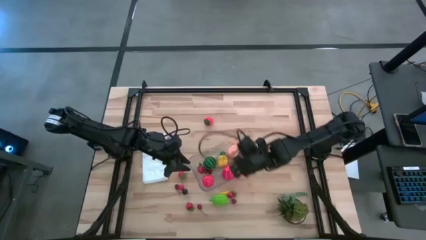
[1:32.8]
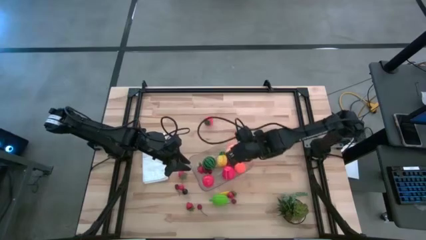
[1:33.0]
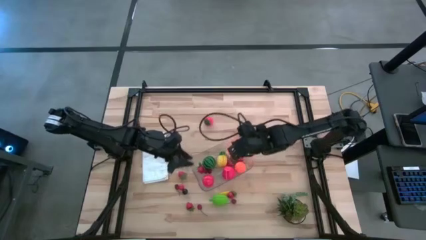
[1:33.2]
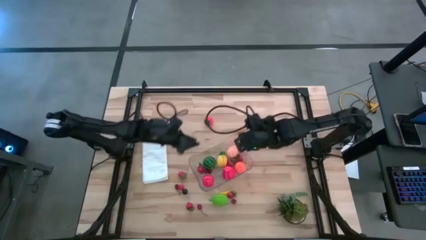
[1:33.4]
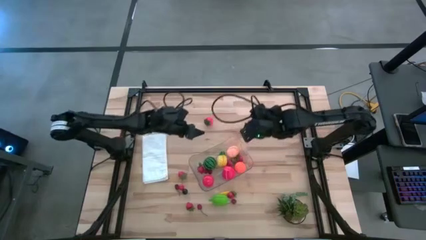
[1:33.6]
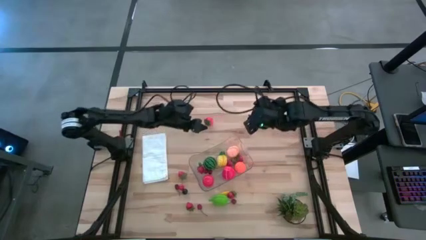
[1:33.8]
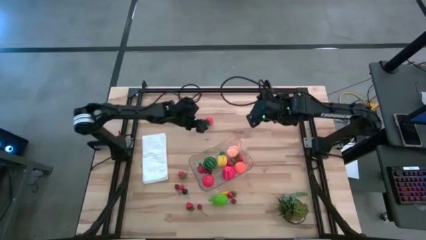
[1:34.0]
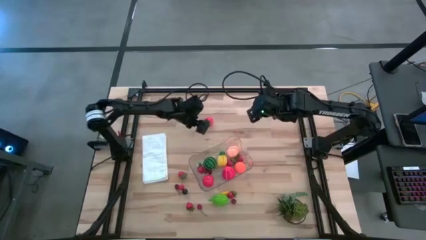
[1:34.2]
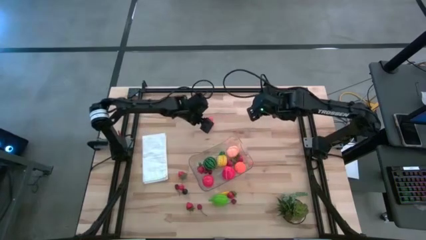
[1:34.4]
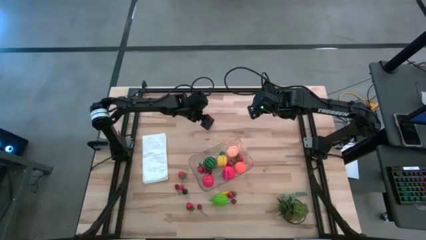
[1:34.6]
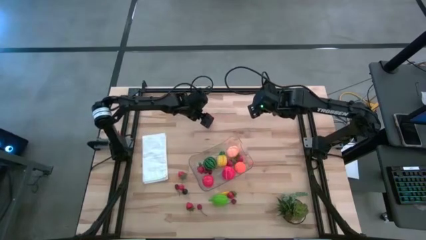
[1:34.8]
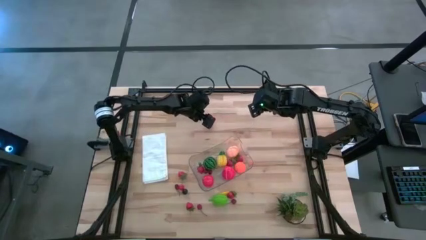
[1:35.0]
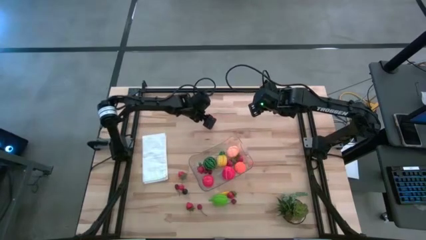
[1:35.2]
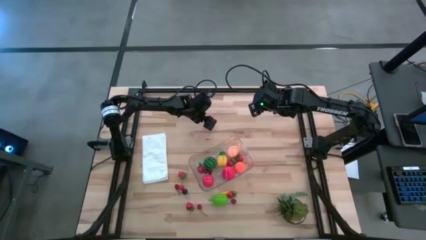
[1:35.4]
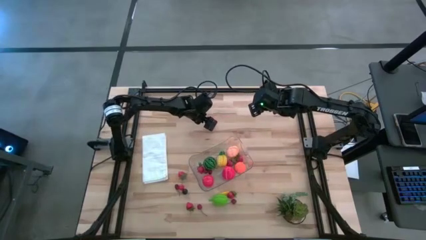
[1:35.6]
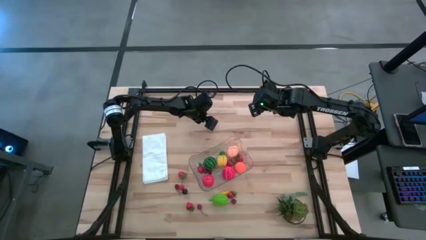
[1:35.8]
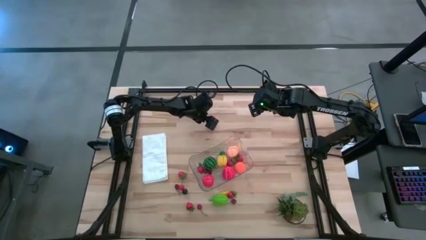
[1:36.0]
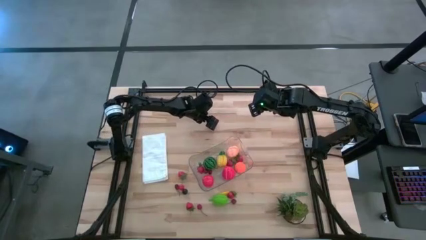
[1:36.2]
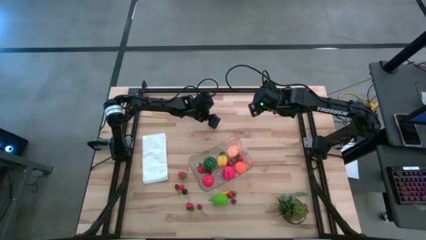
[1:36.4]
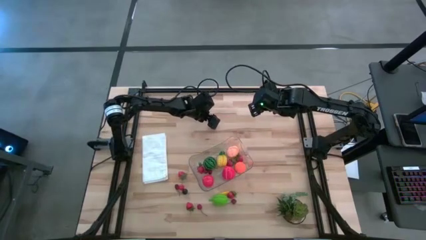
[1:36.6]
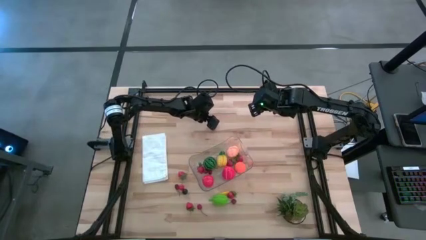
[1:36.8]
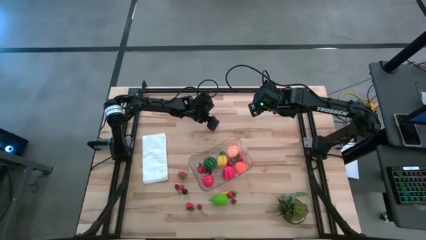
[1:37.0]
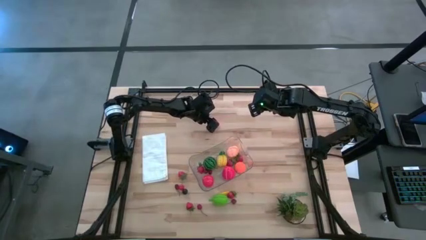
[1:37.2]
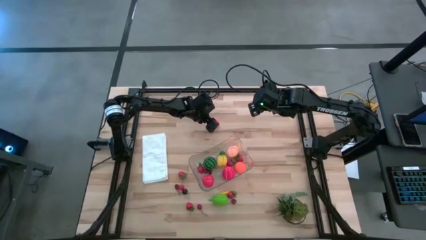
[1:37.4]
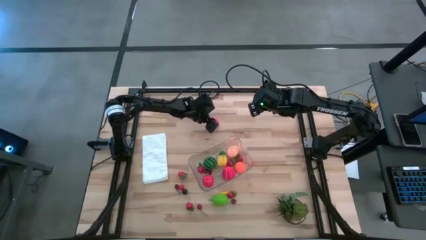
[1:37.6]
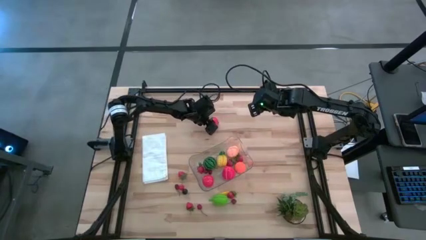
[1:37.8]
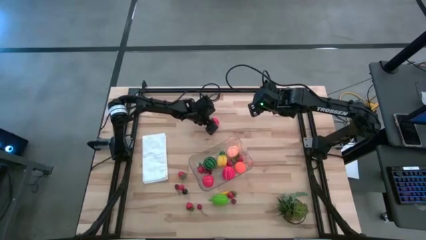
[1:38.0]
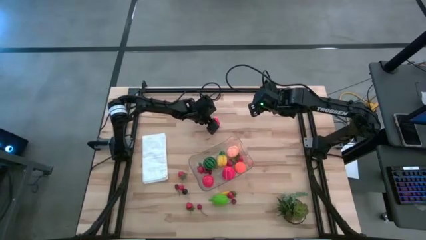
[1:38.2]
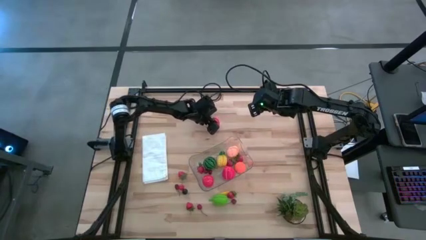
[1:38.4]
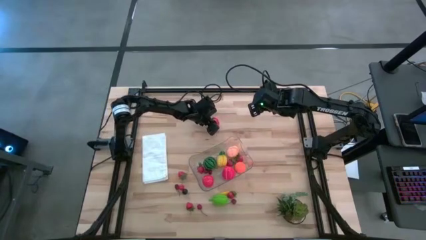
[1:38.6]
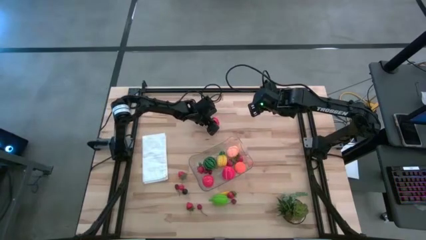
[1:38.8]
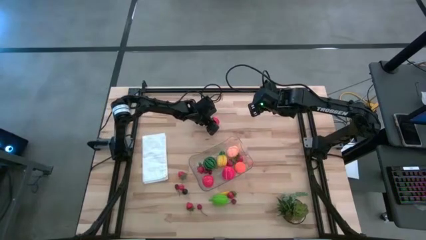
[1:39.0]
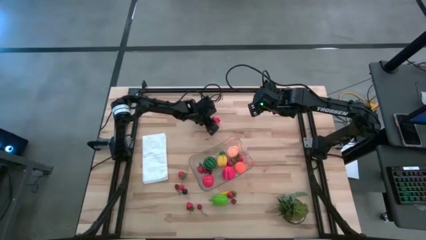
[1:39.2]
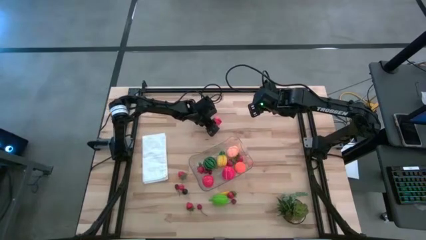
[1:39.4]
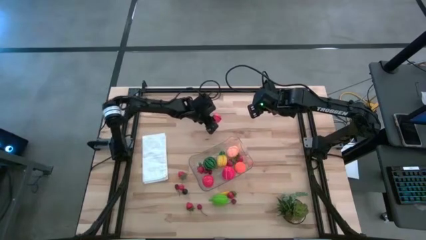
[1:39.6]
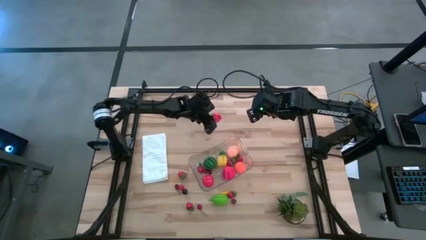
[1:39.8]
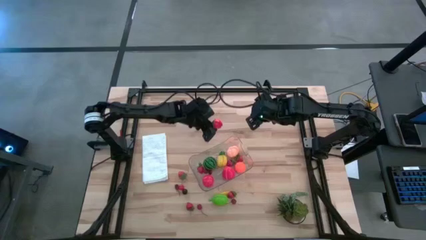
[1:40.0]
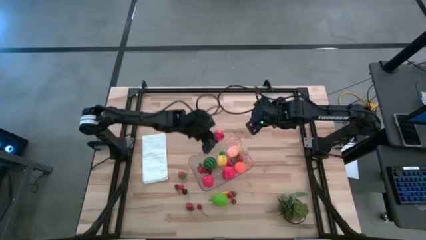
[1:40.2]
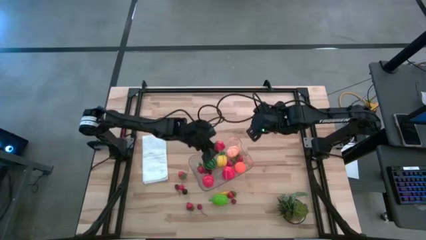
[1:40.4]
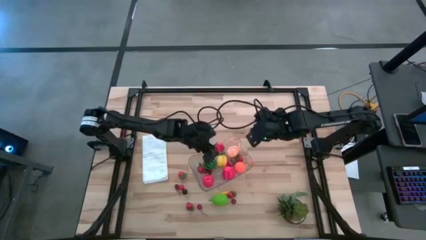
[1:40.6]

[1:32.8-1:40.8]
Task: Pick and placing Produce into tupperware
Put the strawberry into the transparent bin

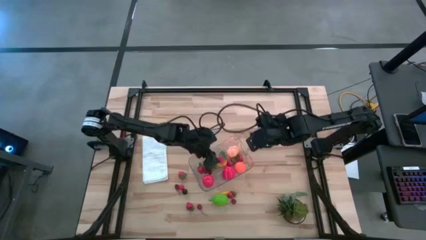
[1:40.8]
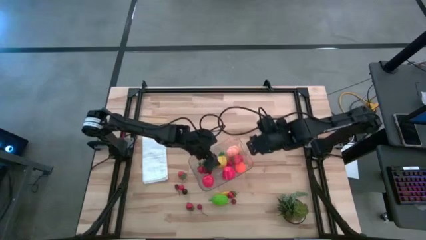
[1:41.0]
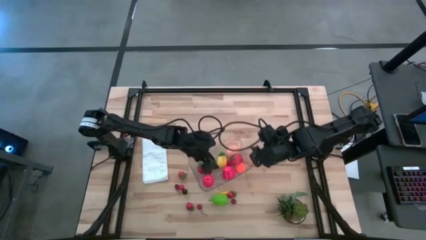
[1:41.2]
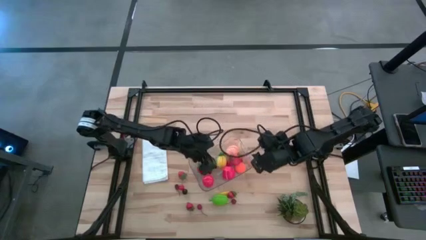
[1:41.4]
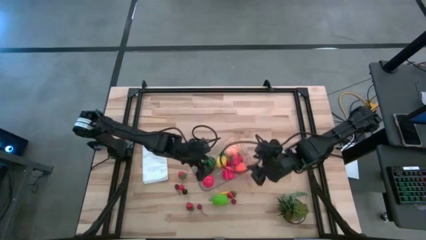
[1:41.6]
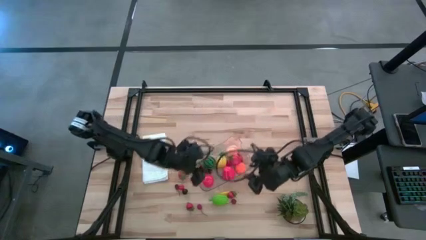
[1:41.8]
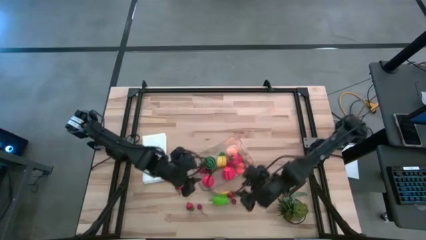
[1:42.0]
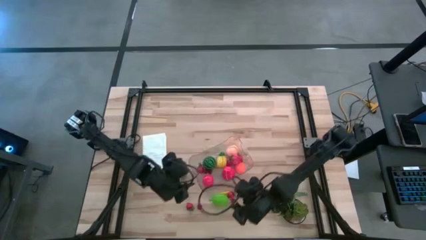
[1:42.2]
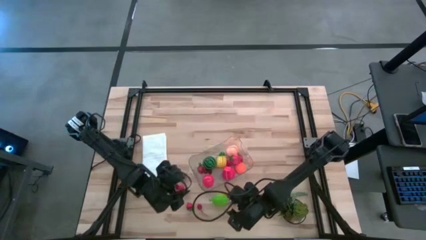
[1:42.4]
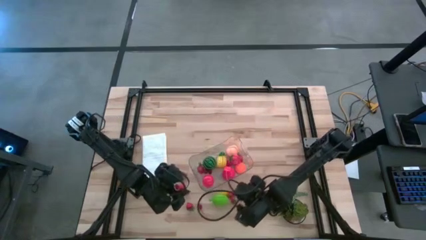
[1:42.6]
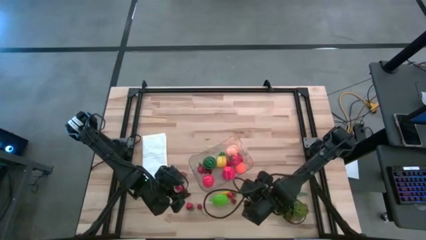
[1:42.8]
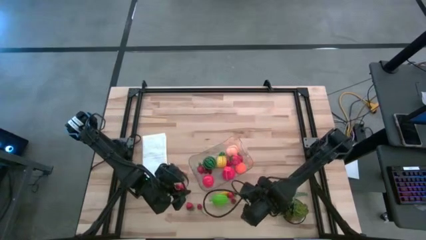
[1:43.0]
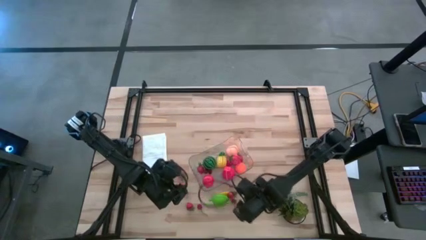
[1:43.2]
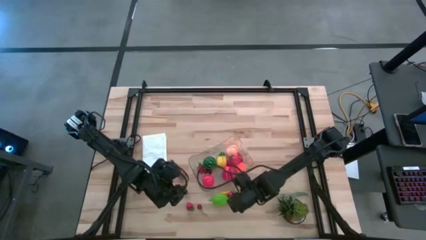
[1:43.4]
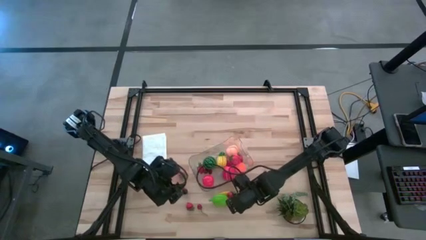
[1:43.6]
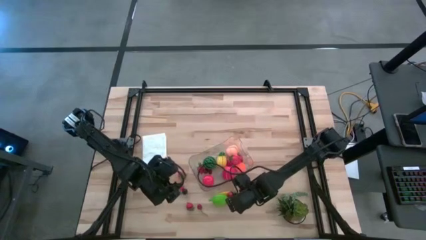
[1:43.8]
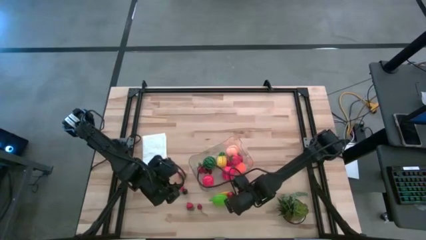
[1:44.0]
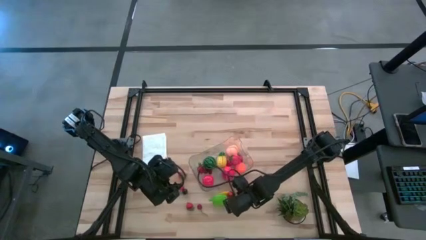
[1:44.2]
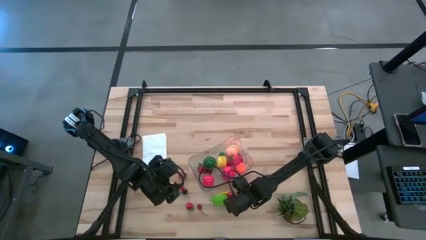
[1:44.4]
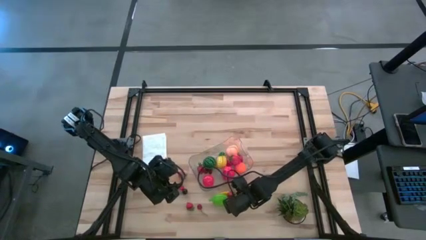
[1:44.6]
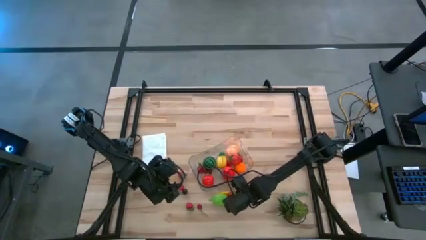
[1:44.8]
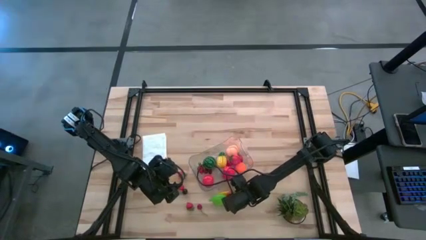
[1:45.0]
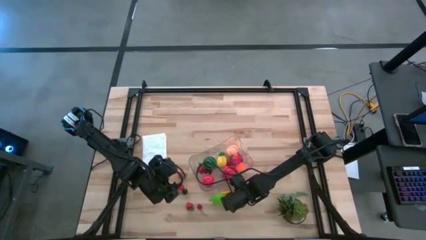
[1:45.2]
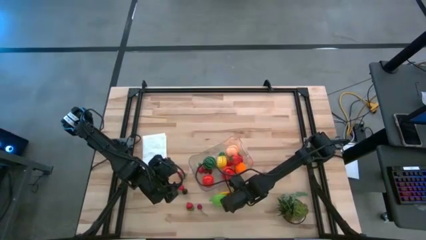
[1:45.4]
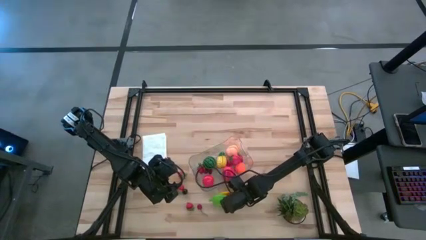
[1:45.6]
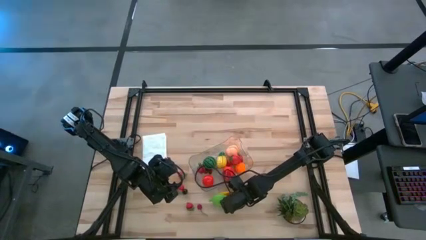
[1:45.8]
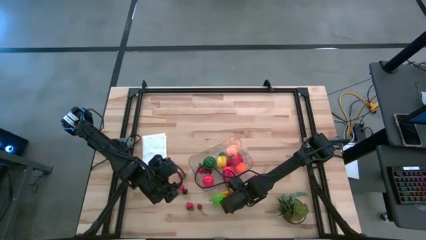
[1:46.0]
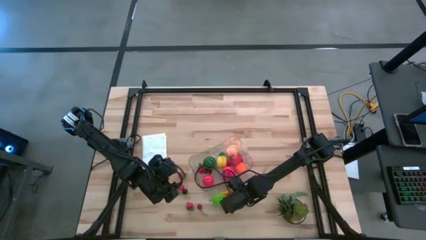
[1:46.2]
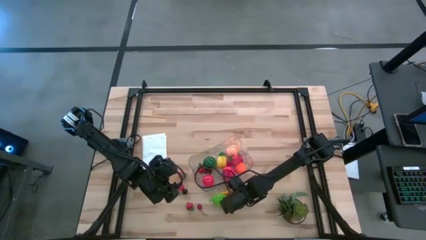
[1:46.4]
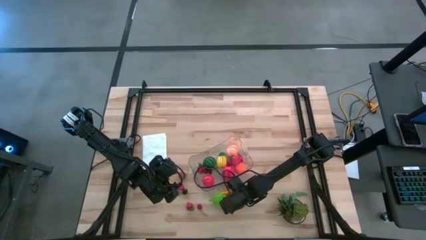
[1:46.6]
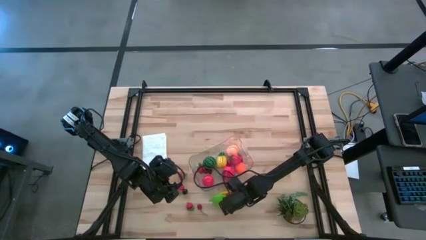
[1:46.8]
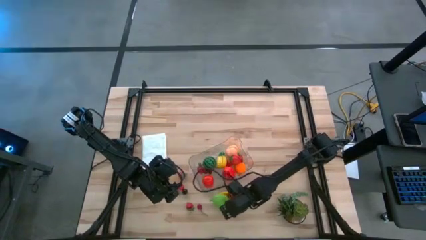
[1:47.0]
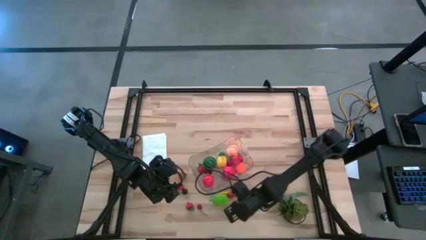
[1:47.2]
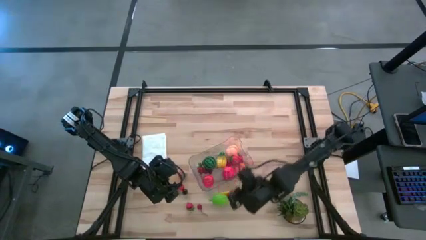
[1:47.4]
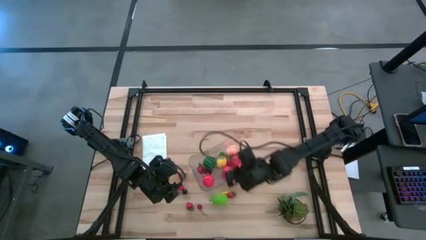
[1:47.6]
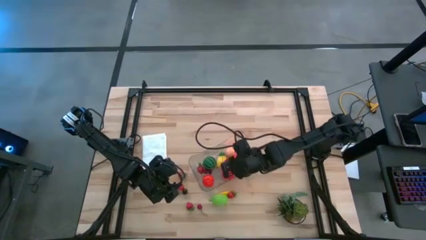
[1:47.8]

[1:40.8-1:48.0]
Put the bottom right dark red cherry into the transparent bin

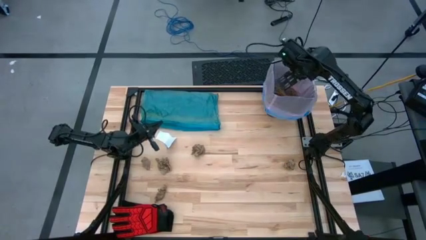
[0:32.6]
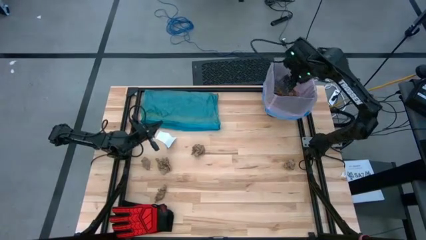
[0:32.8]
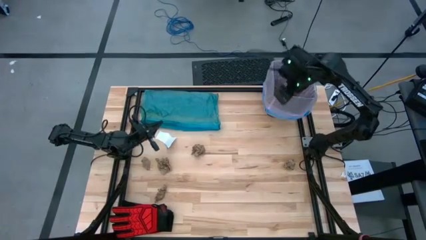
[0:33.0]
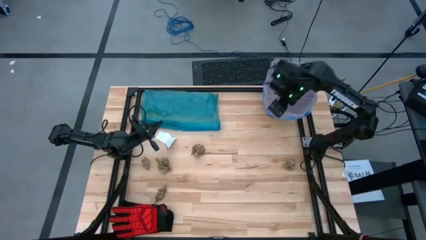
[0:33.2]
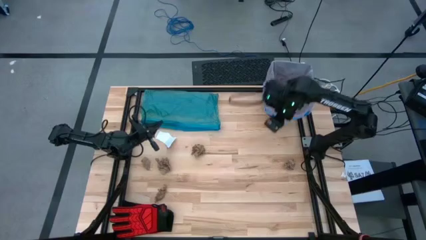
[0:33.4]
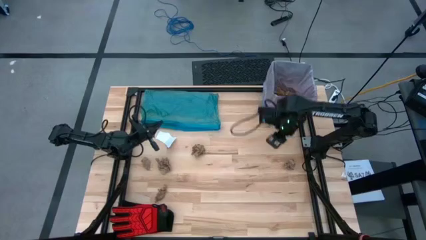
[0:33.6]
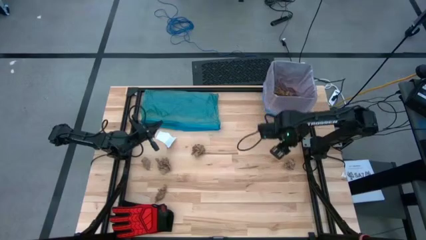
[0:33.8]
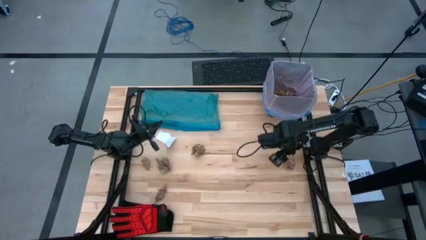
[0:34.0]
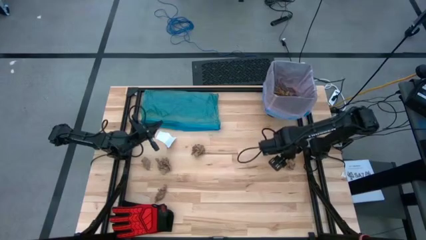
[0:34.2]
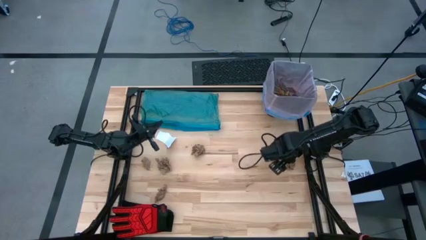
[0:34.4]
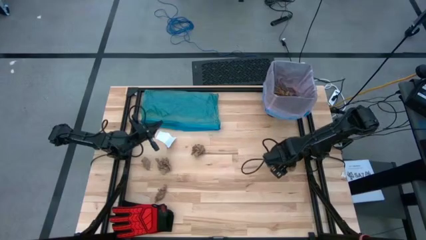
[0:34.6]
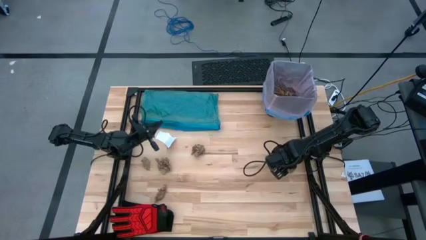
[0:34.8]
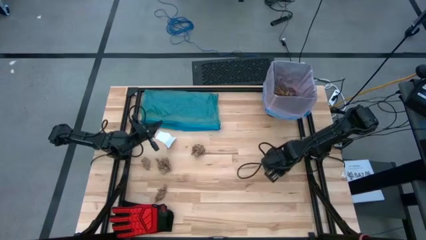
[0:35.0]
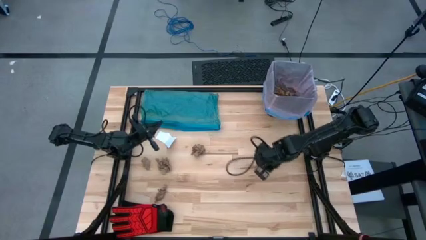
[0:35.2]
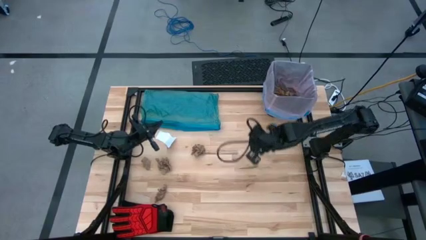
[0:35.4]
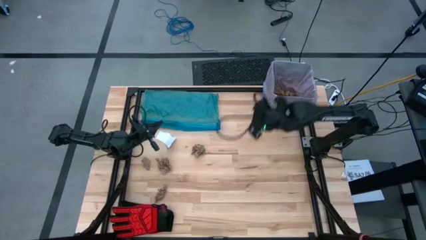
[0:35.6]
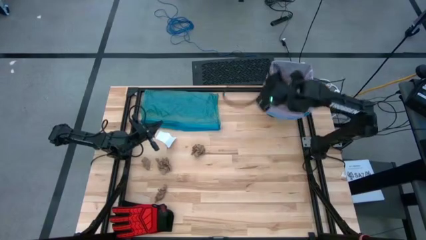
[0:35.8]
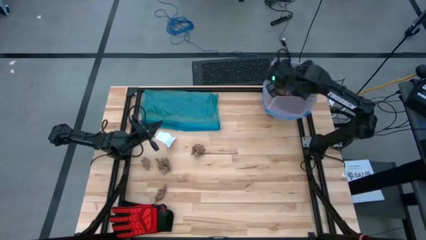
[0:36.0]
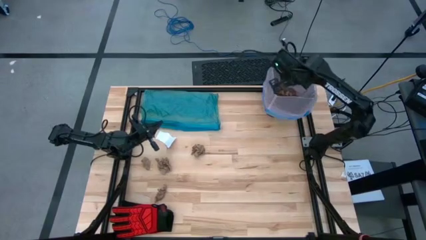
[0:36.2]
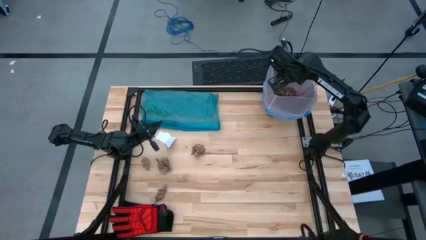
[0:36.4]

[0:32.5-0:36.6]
Task: place trash/remove bag and relplace
Put the brown napkin into the trash bin
